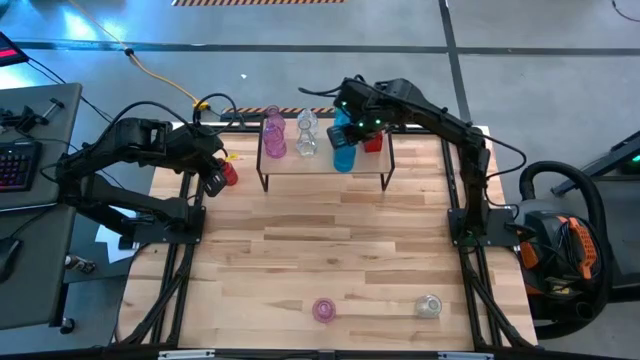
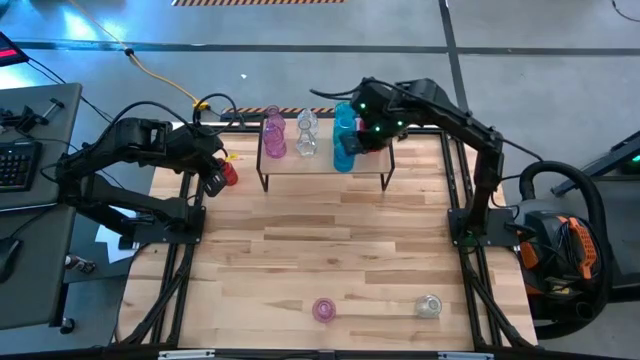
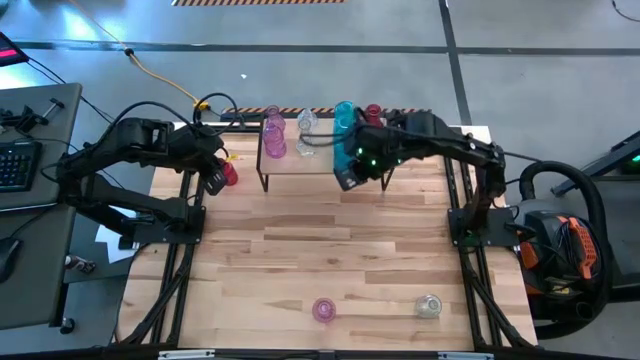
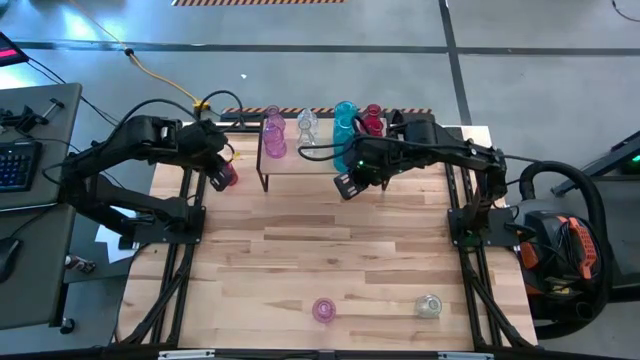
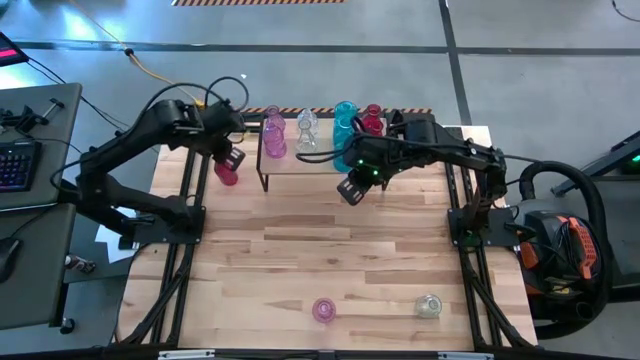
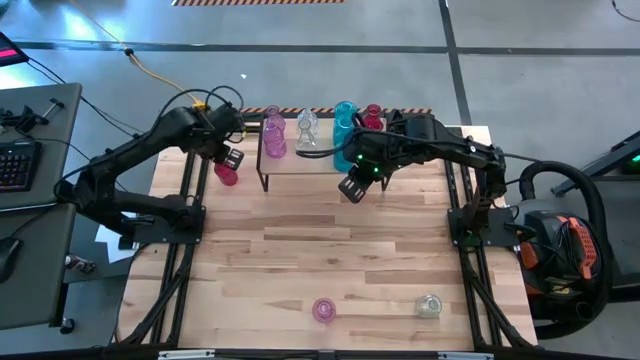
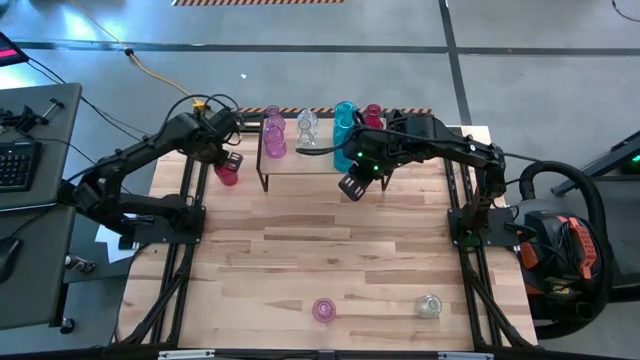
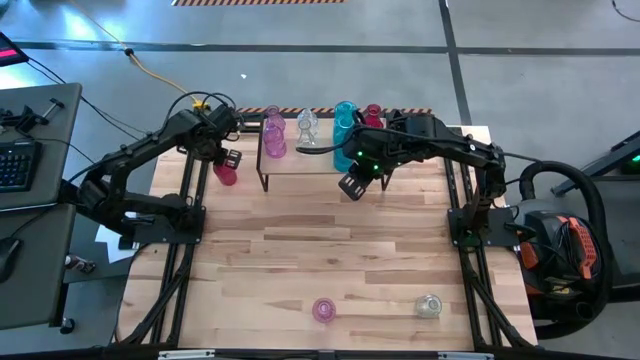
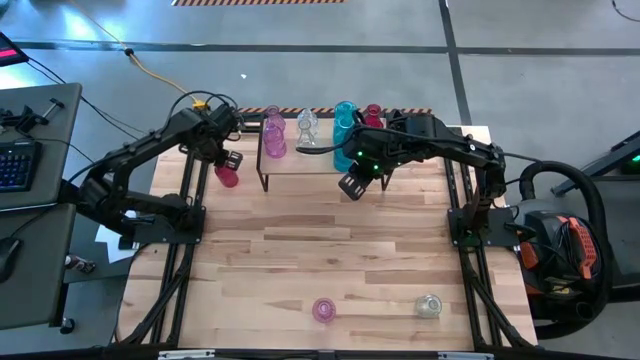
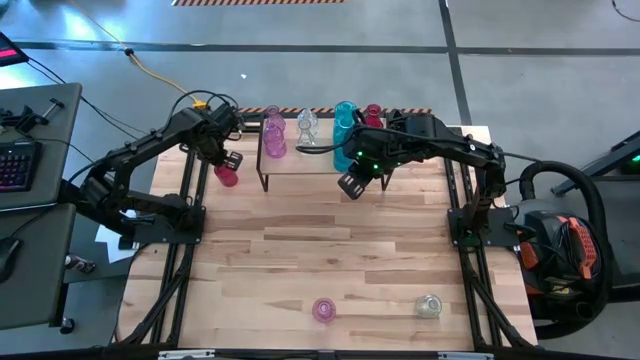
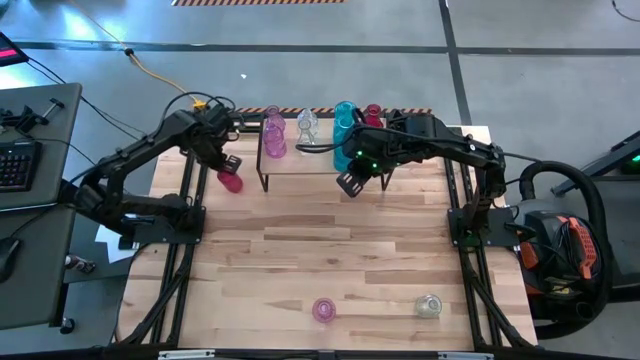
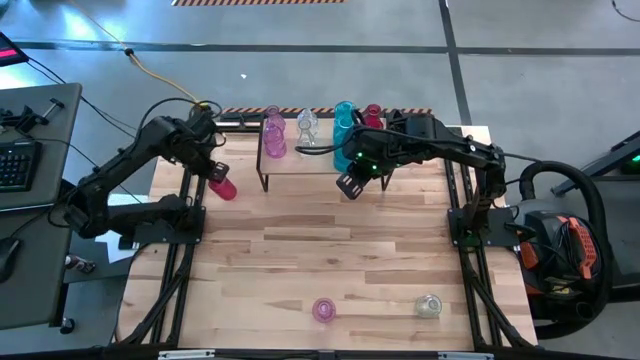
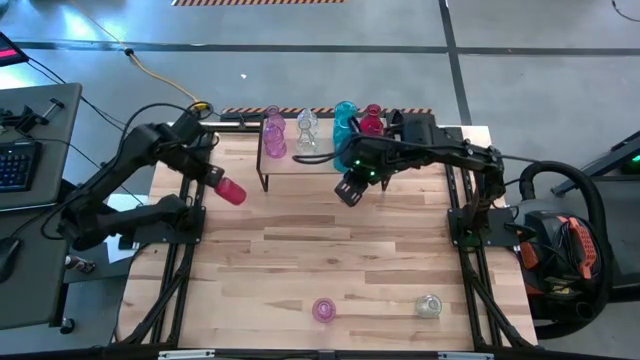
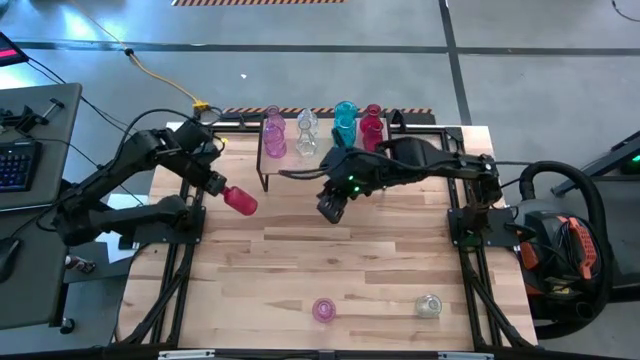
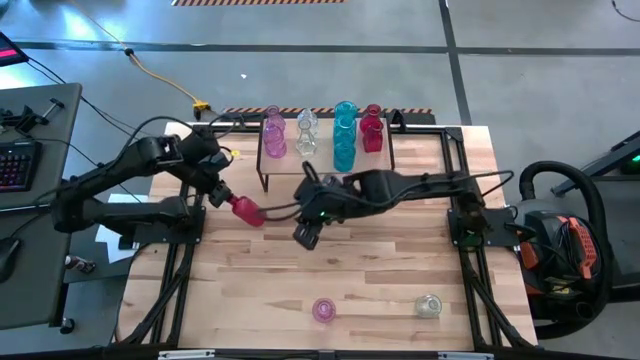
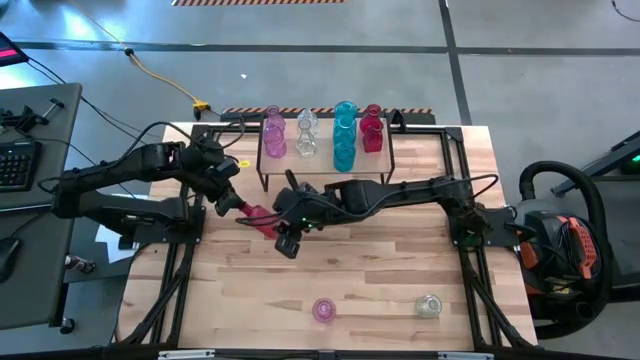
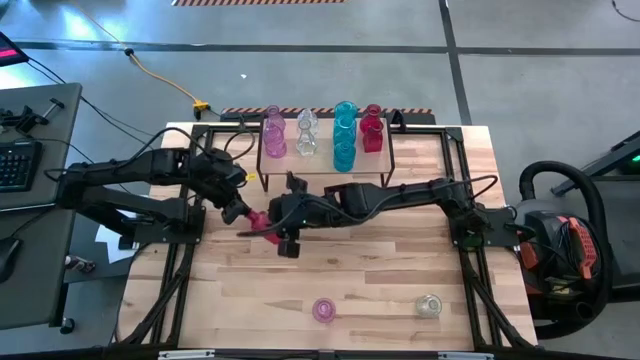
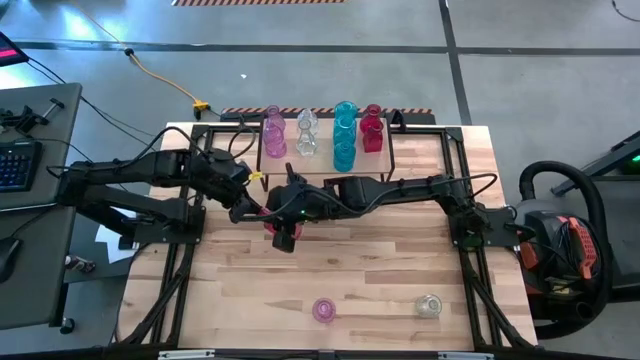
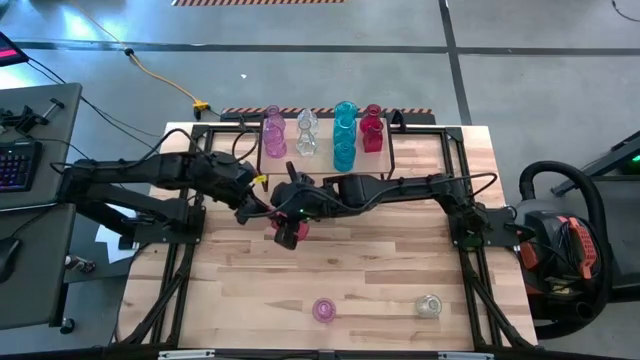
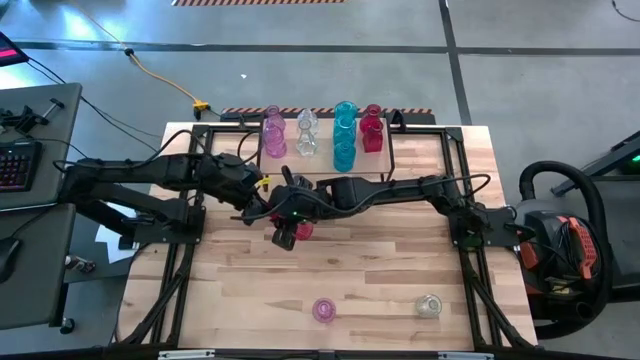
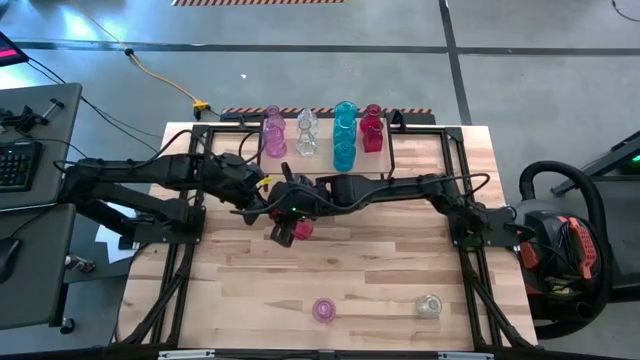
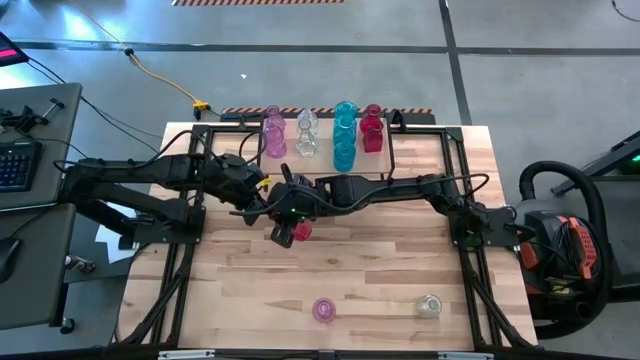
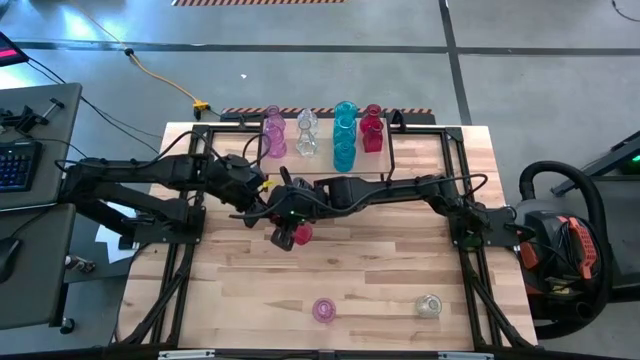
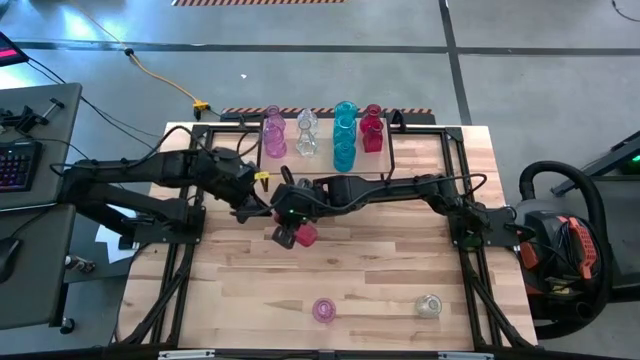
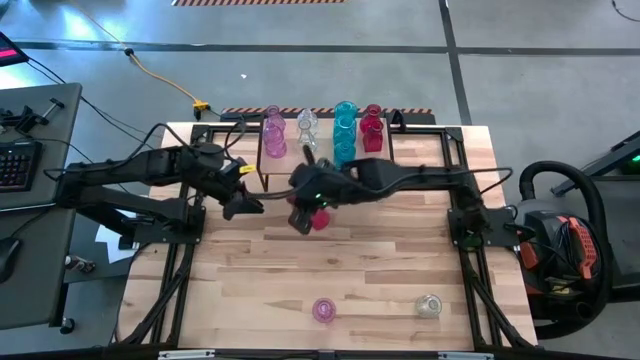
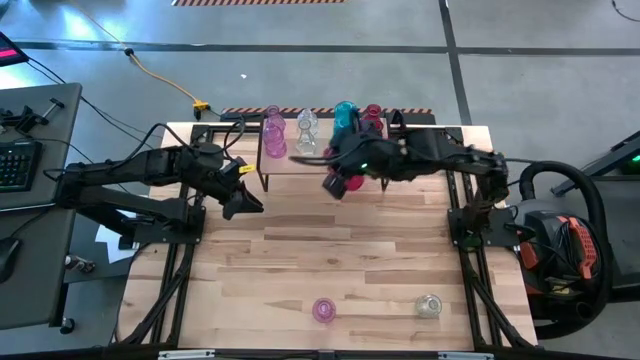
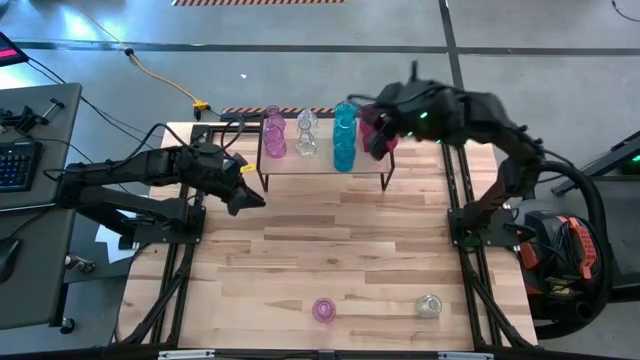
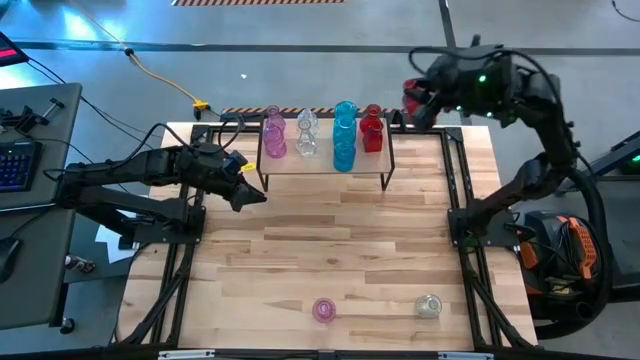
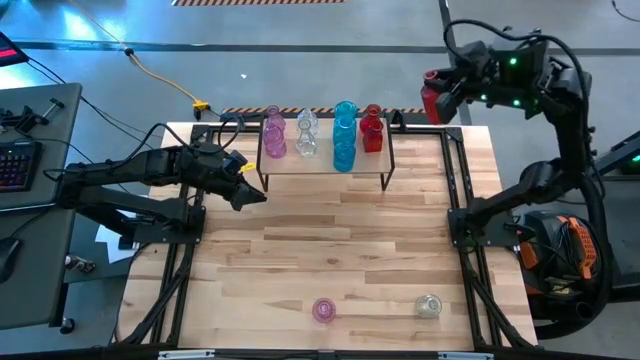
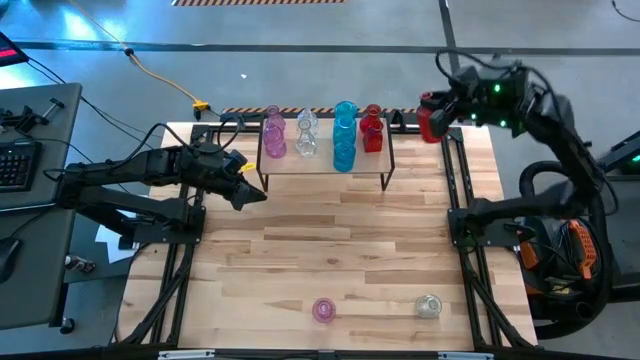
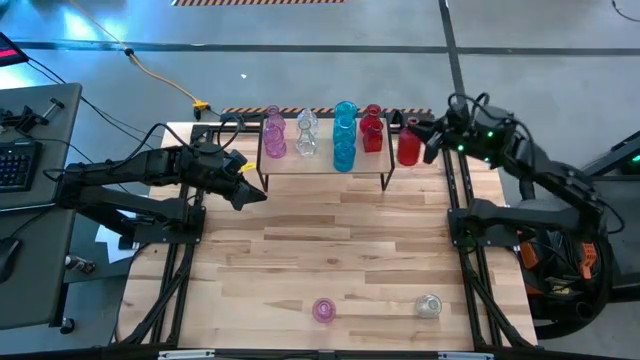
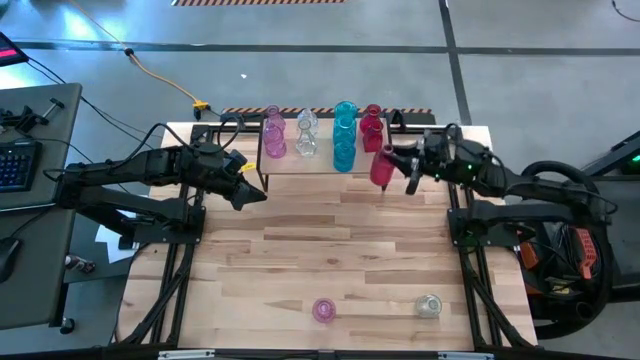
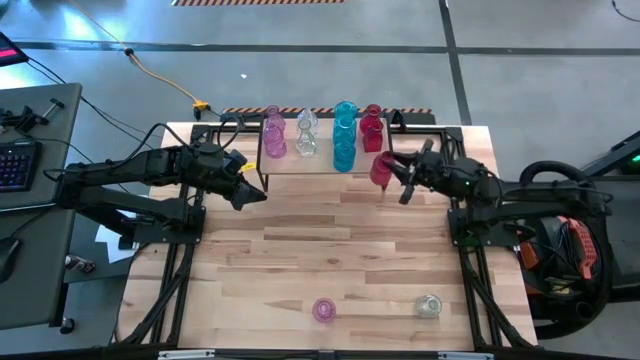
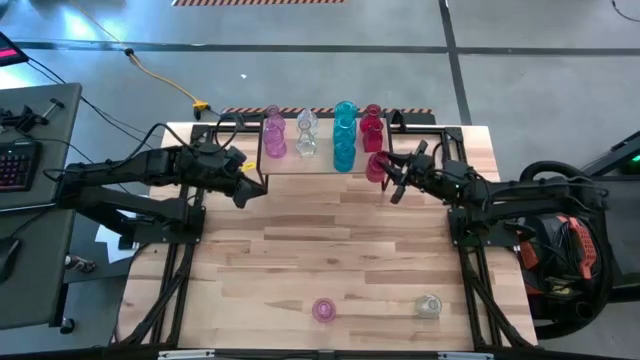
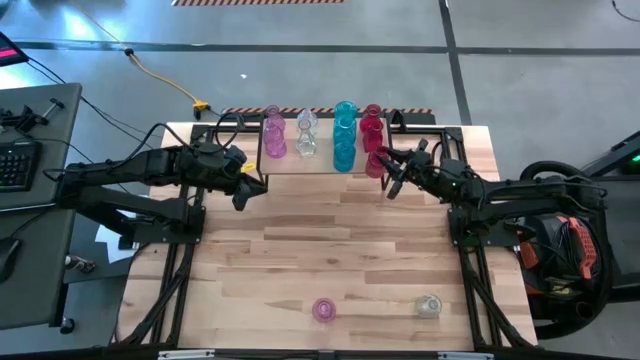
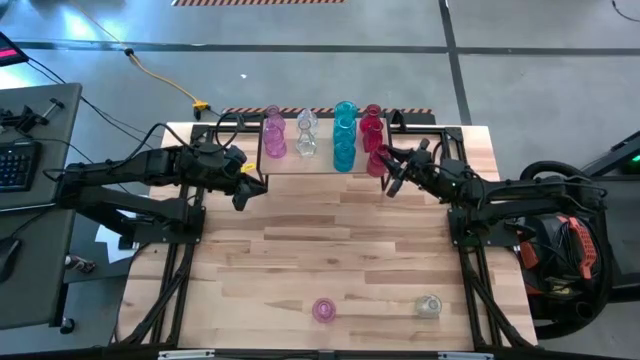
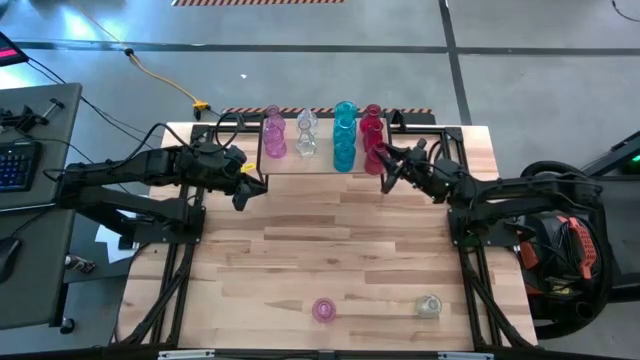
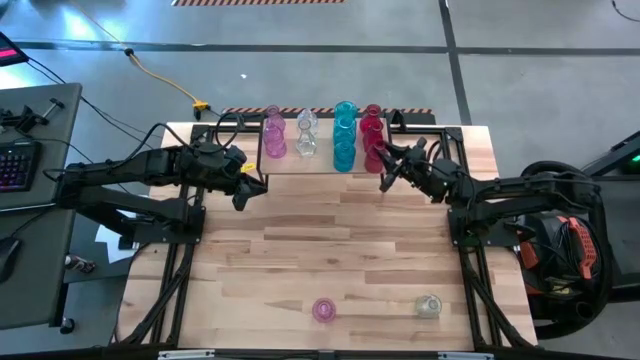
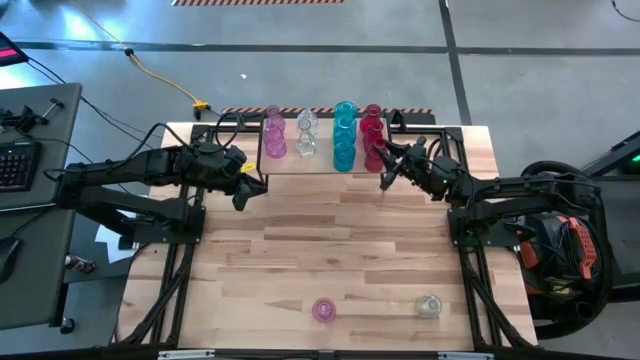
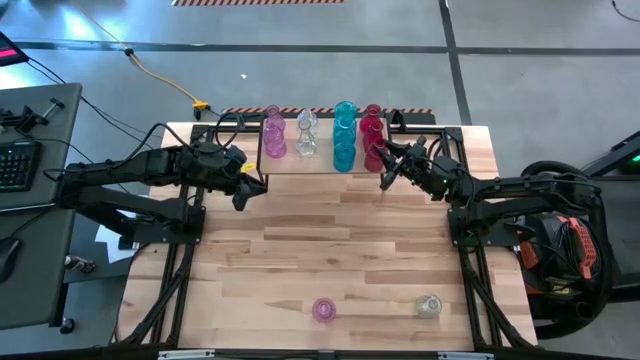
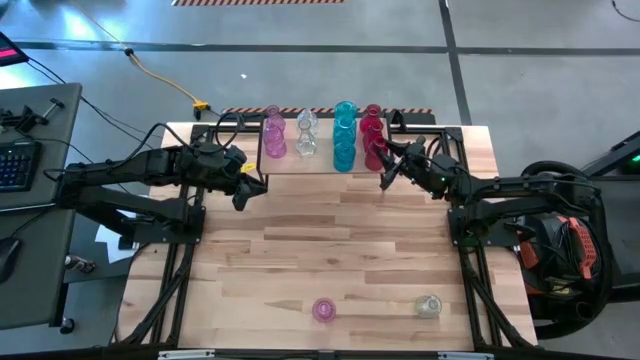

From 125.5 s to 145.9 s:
Task: sort vases onto shelf
Put the red vase on the shelf aligned with the other red vases
